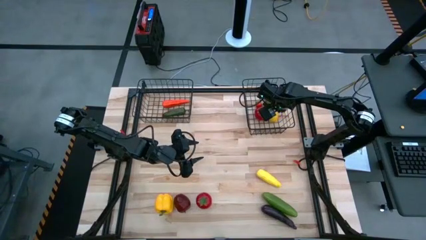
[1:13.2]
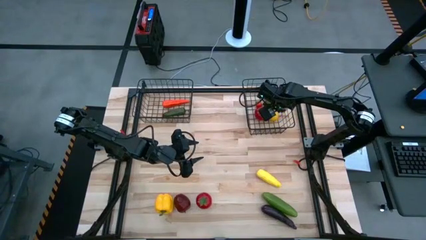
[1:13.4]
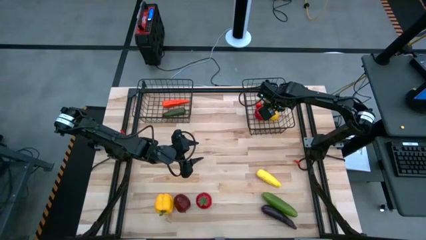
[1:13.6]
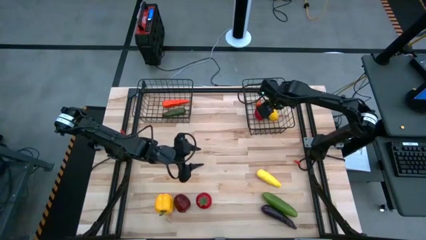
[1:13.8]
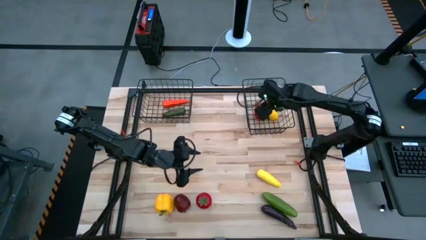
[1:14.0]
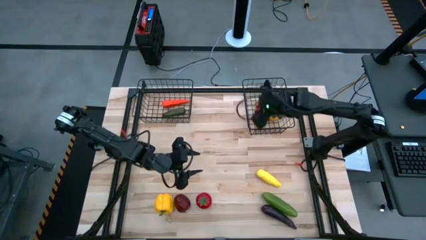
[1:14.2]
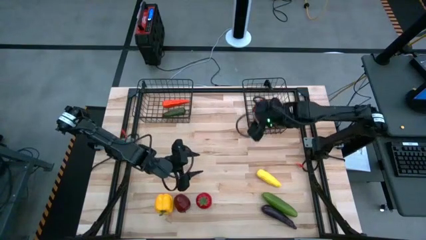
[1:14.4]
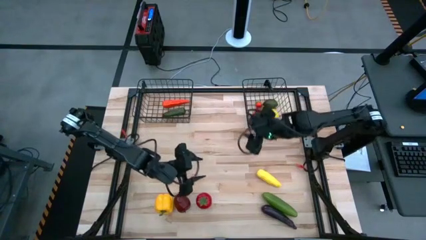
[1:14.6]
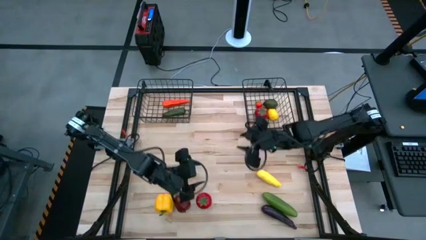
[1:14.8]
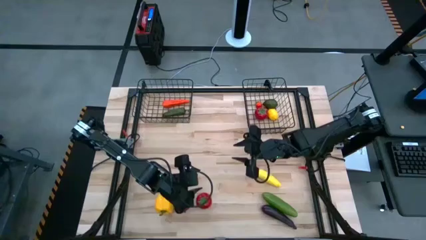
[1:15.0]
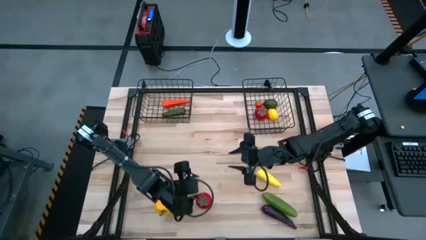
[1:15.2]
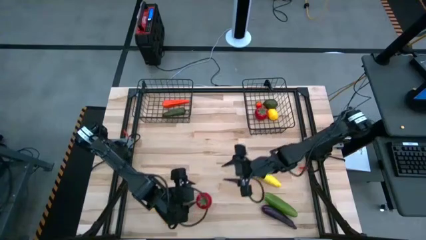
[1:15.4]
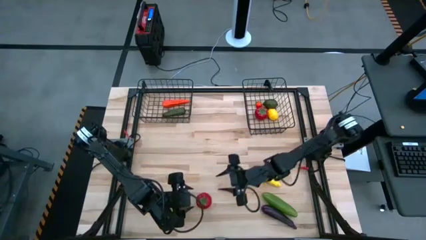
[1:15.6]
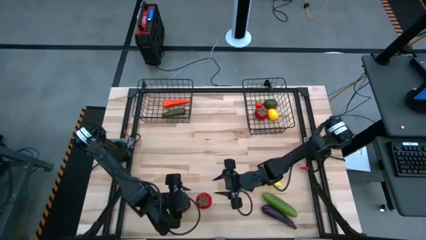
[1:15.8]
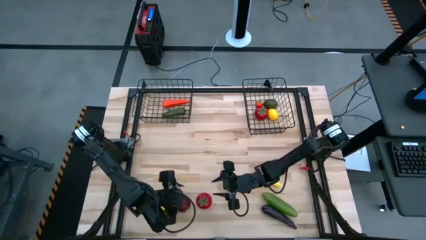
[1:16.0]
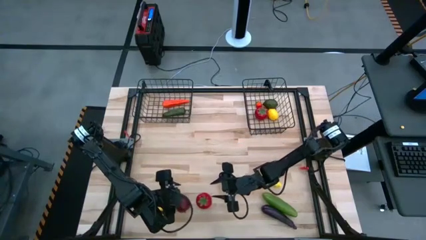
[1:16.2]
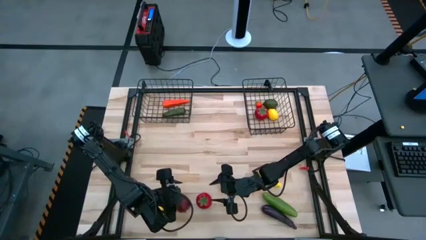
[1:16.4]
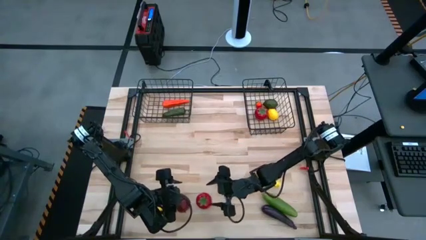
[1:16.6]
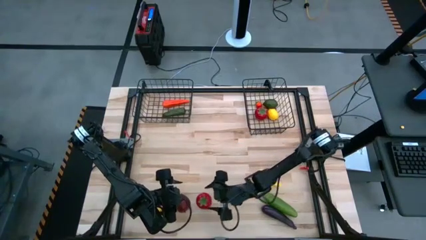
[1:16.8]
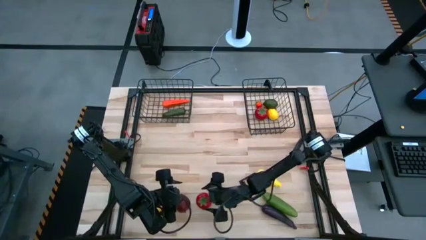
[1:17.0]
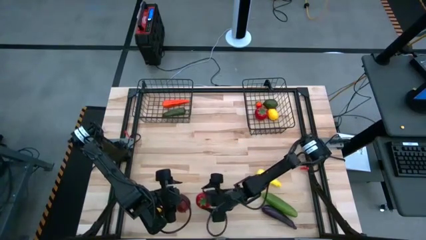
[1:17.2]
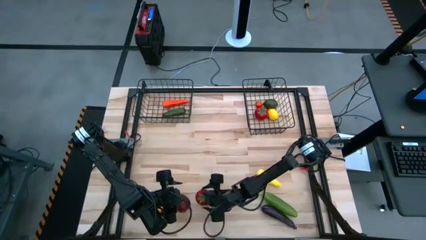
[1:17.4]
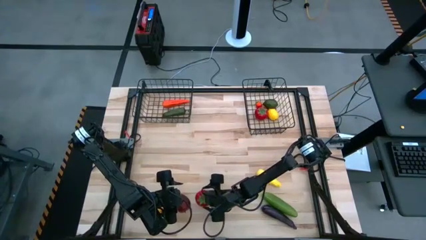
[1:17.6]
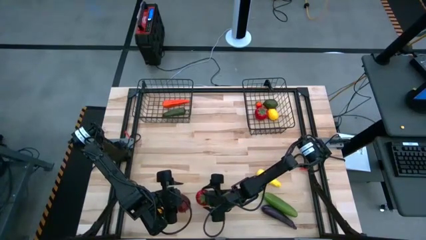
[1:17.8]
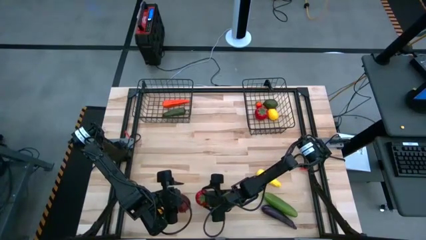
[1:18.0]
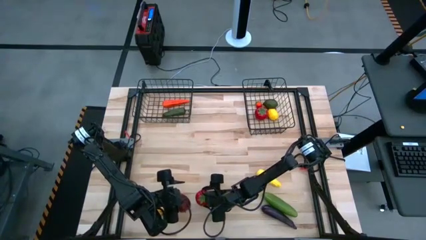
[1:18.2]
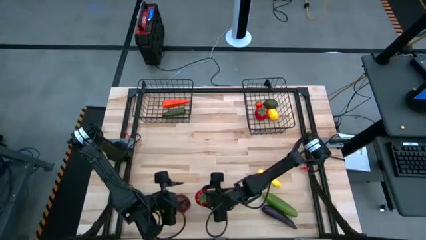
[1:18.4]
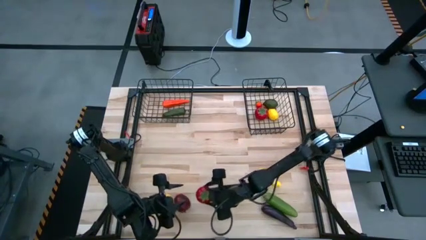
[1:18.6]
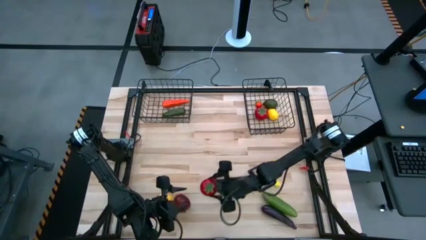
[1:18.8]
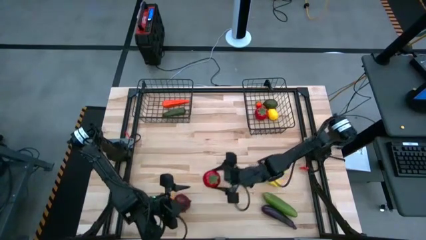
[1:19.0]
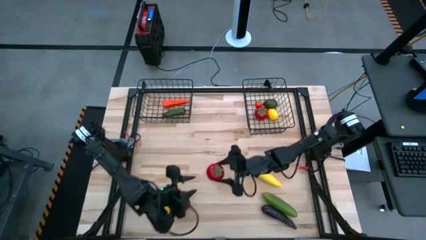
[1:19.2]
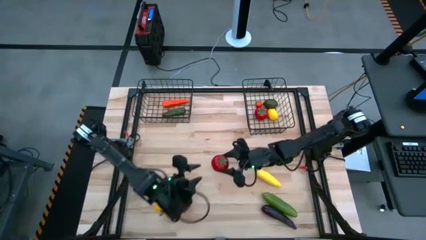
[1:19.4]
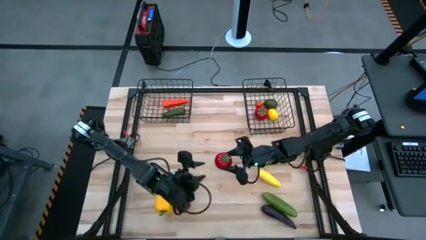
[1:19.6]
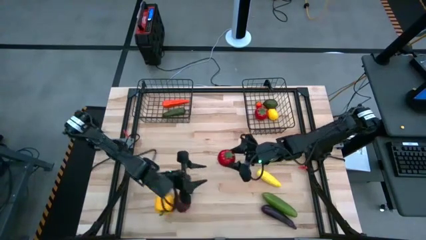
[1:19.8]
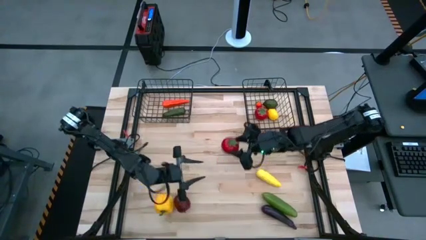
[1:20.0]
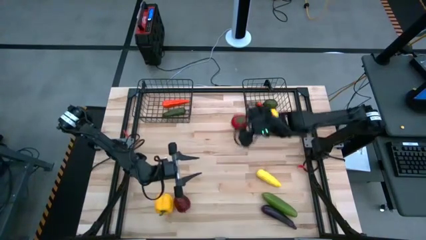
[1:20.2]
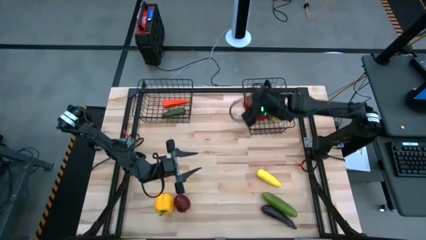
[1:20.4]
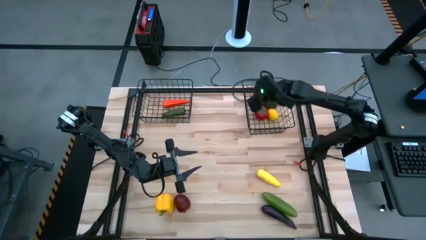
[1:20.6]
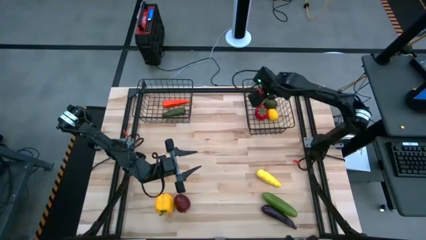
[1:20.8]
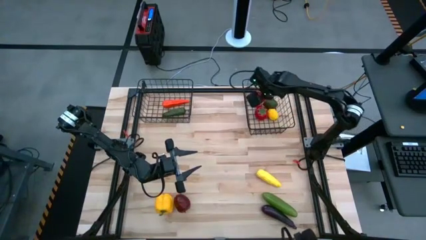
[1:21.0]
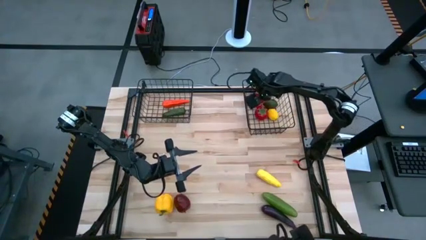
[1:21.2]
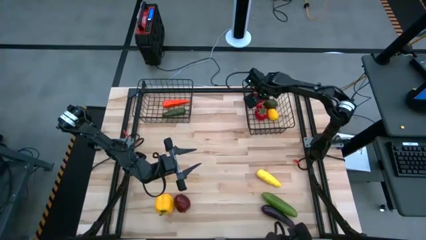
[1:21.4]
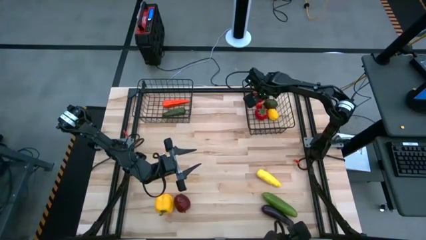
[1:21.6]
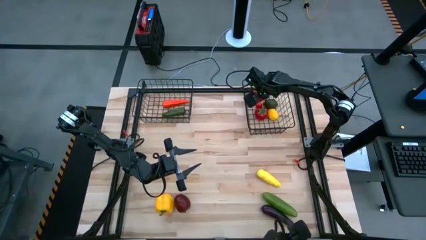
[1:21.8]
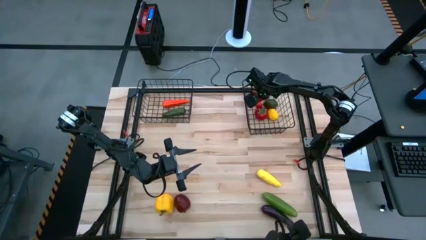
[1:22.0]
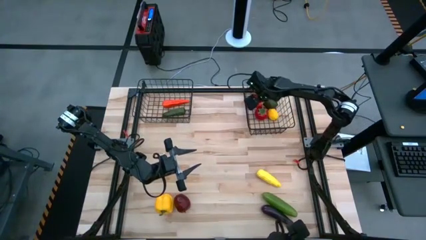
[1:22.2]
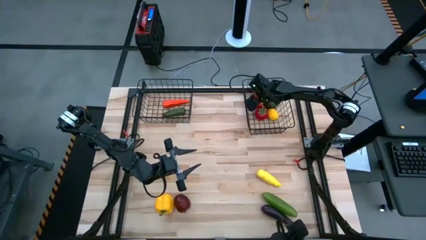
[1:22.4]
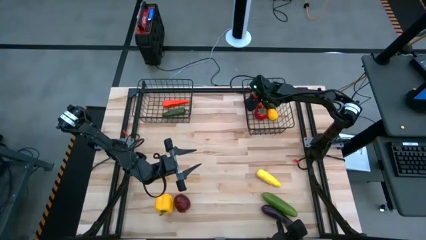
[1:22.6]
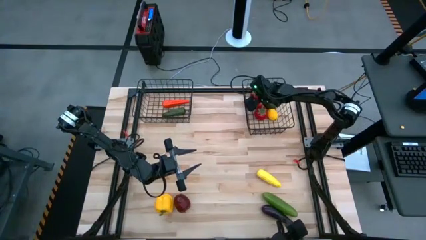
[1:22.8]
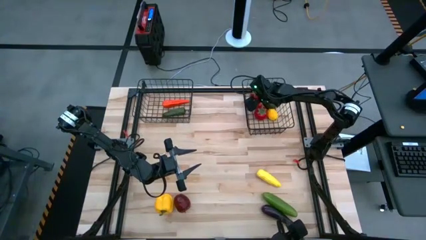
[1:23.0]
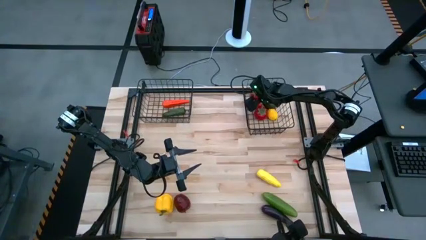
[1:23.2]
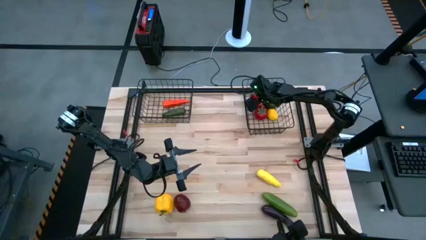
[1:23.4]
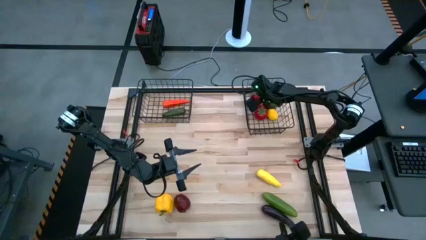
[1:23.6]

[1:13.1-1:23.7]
Task: Sort produce into baskets
Put the red tomato into the right black wire basket

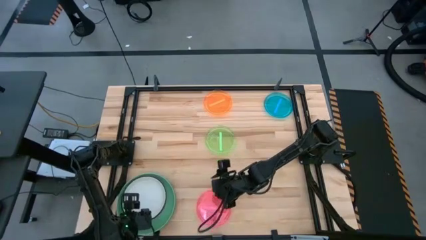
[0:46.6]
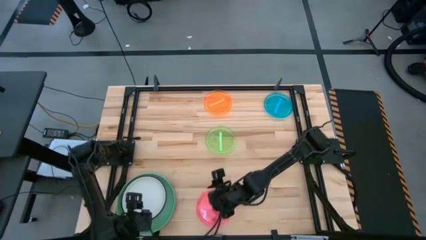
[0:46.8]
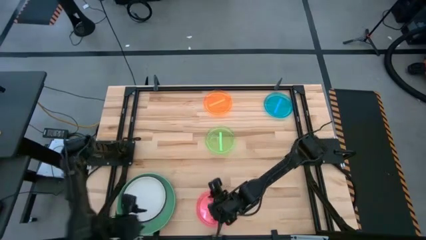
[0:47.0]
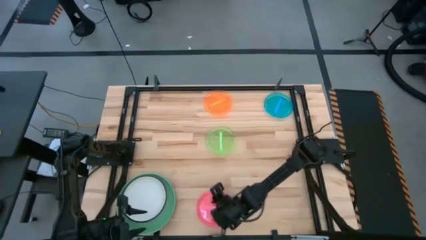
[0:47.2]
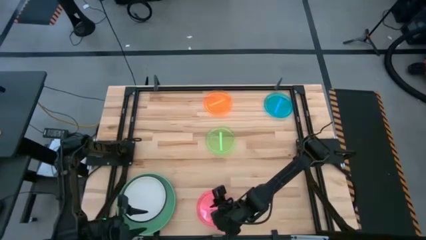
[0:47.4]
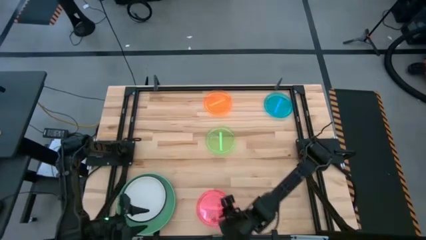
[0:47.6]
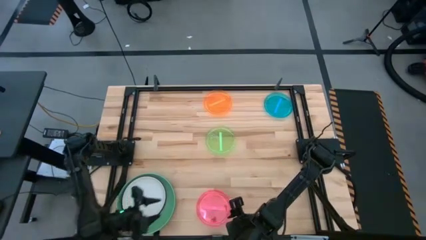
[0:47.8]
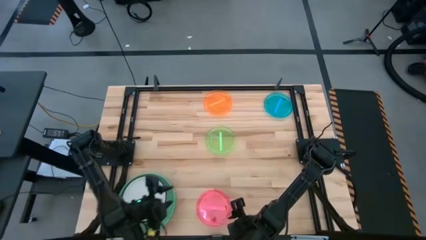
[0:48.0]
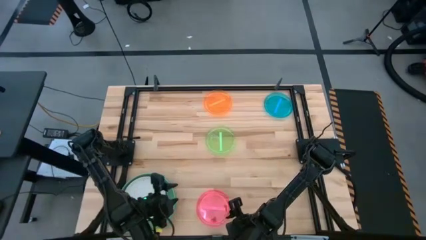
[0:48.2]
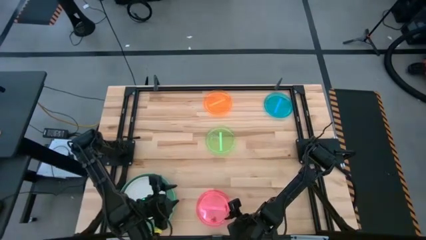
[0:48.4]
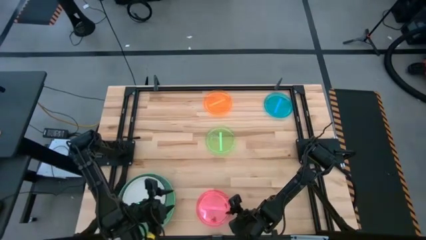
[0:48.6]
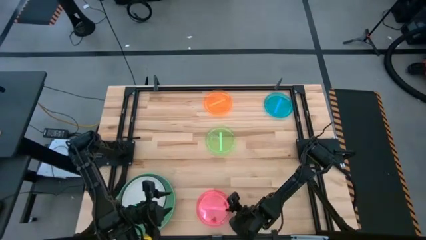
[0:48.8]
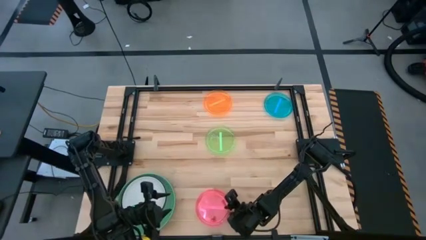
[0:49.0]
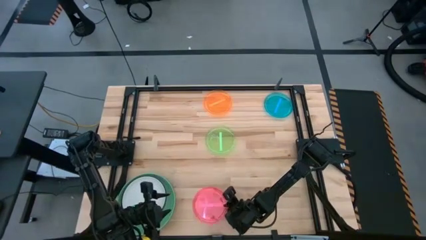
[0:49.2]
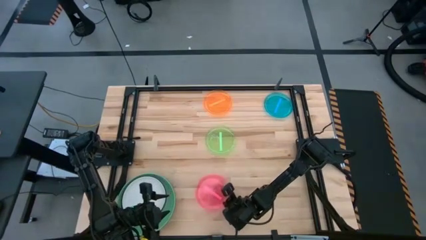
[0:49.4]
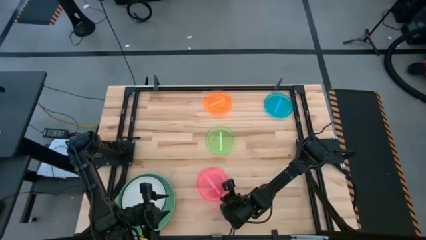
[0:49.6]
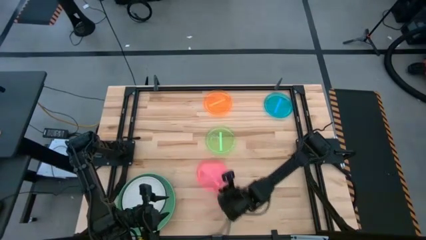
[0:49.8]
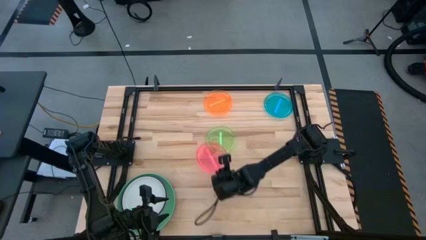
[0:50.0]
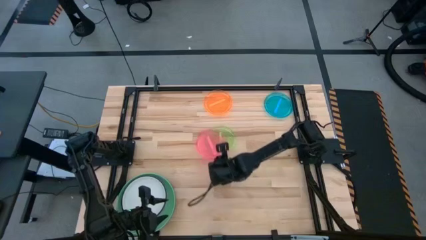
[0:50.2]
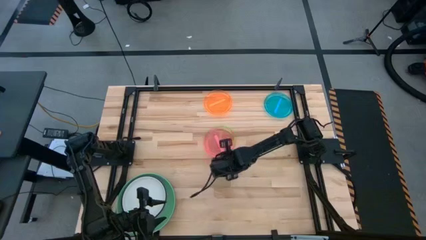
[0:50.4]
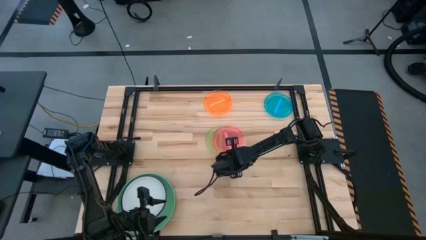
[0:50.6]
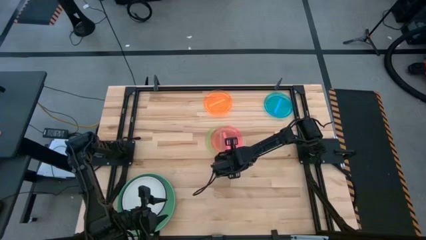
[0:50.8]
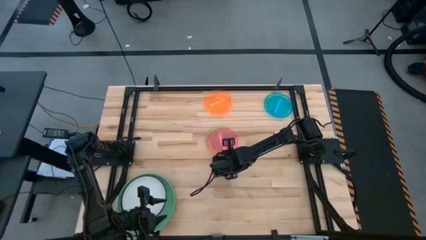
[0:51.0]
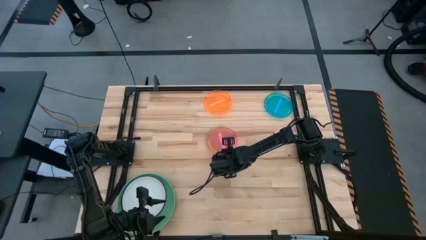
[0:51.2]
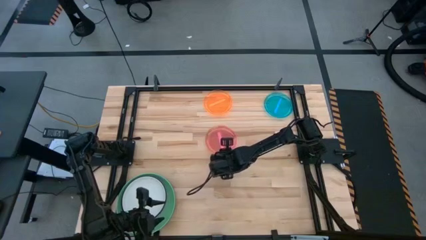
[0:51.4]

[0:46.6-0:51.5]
Task: Stack plastic plates
Stack the pink plate on top of the light green plate
